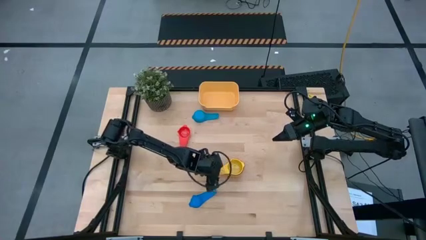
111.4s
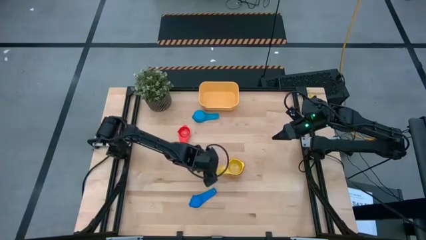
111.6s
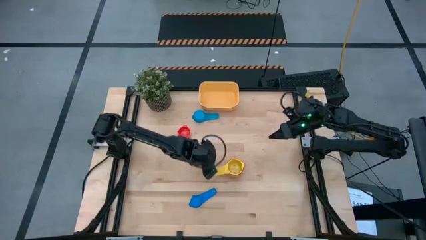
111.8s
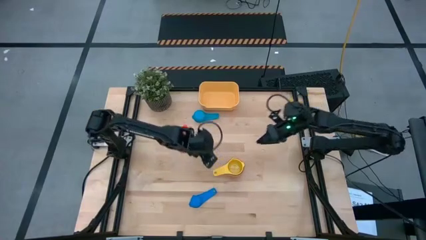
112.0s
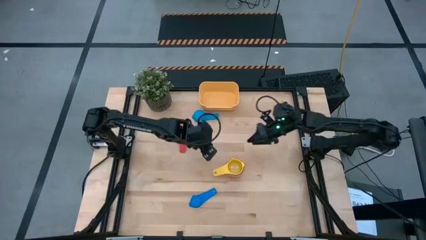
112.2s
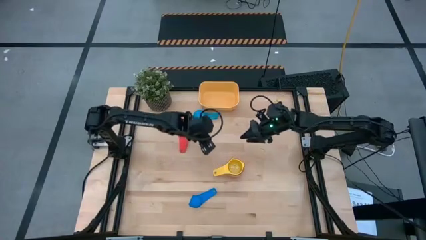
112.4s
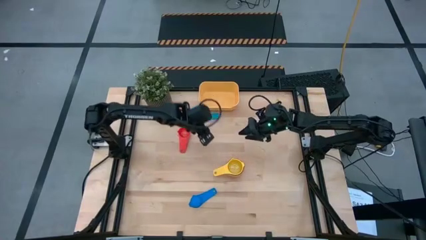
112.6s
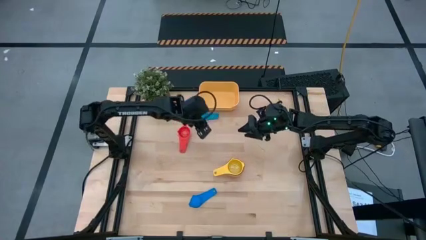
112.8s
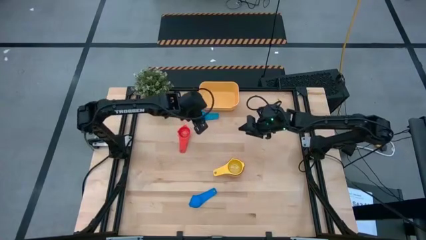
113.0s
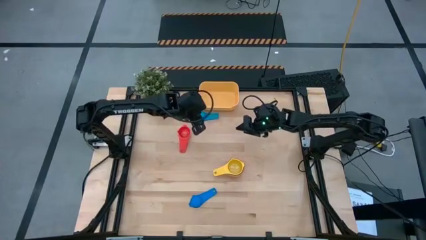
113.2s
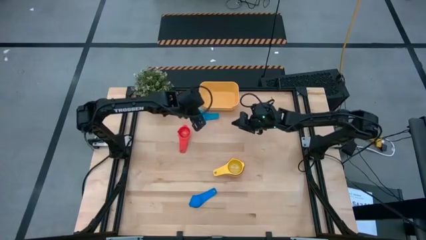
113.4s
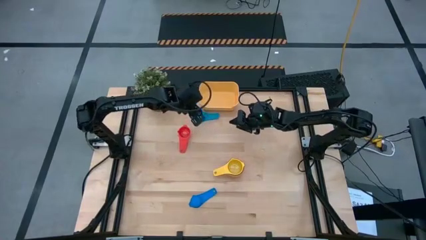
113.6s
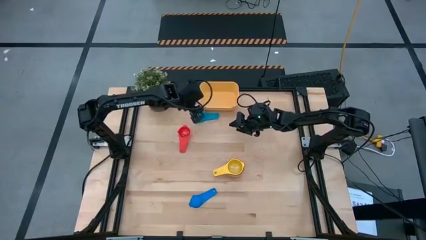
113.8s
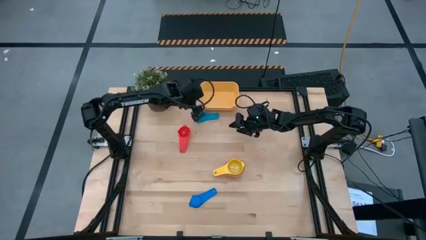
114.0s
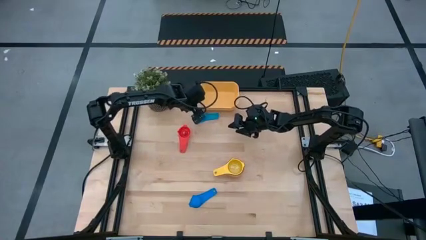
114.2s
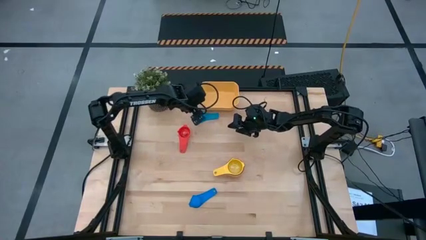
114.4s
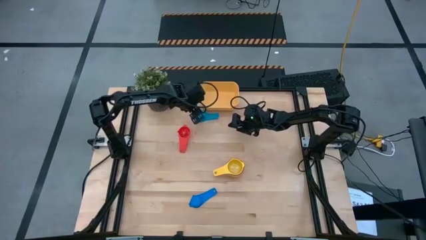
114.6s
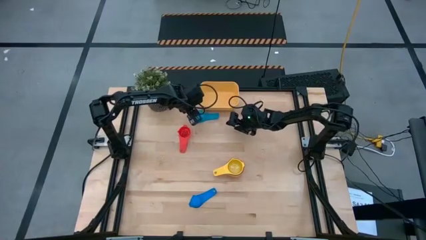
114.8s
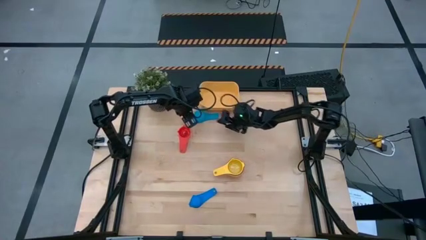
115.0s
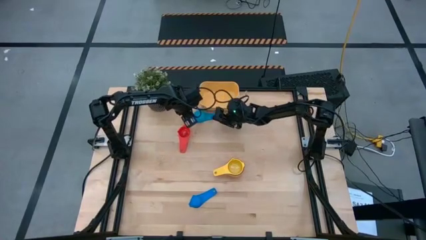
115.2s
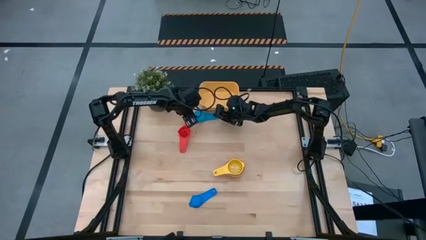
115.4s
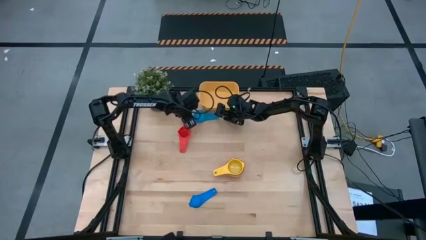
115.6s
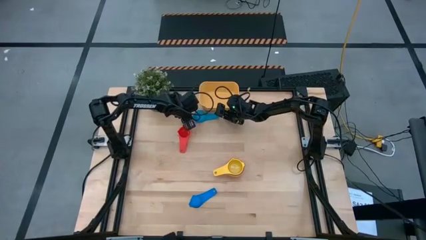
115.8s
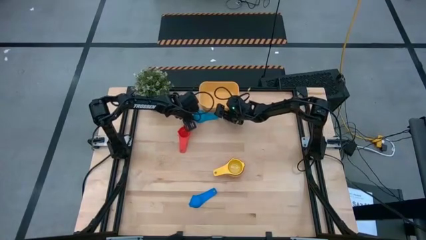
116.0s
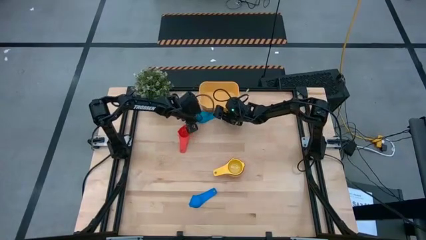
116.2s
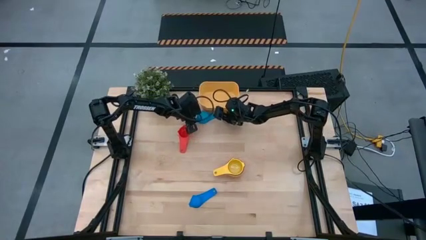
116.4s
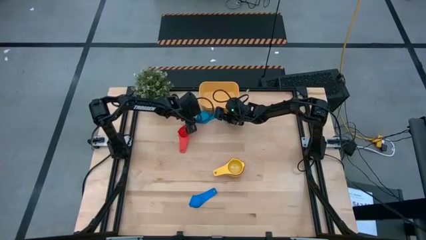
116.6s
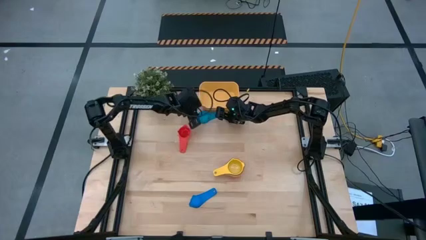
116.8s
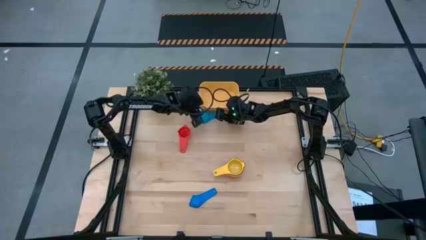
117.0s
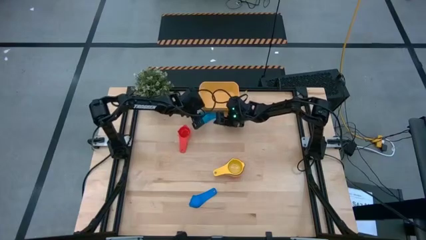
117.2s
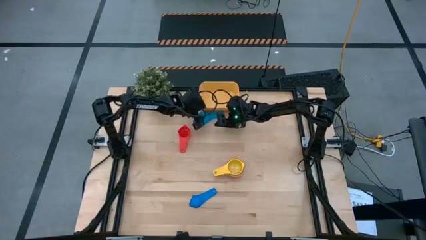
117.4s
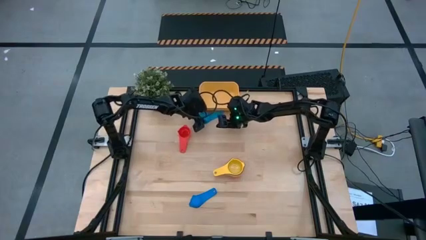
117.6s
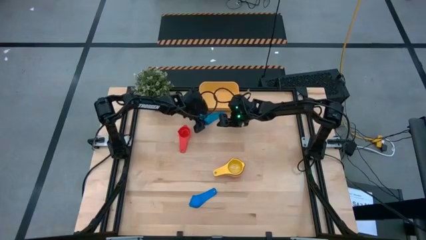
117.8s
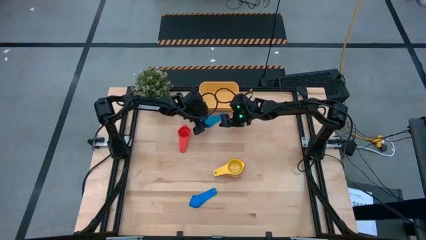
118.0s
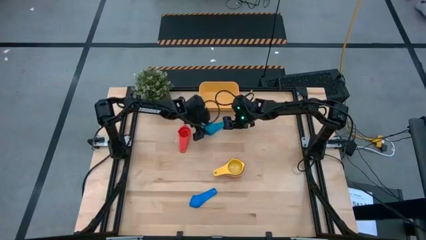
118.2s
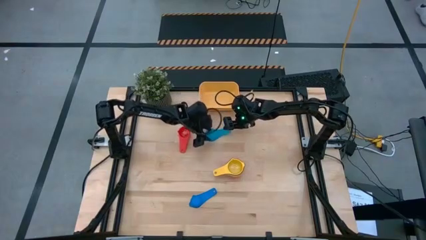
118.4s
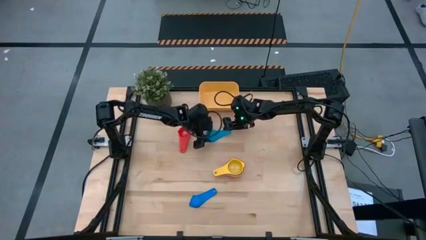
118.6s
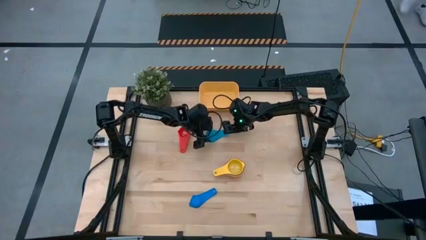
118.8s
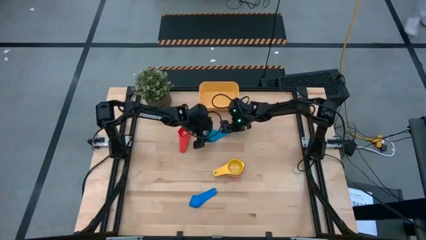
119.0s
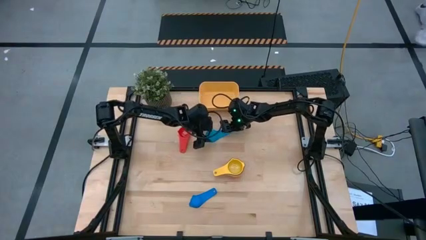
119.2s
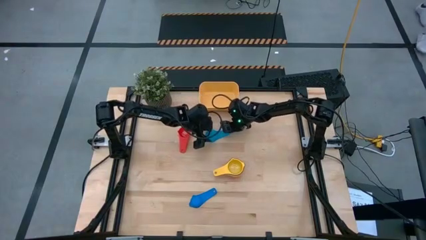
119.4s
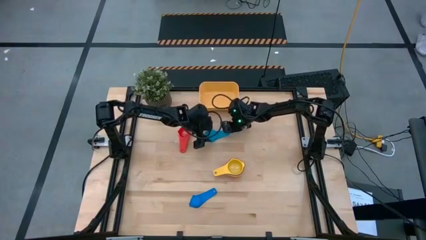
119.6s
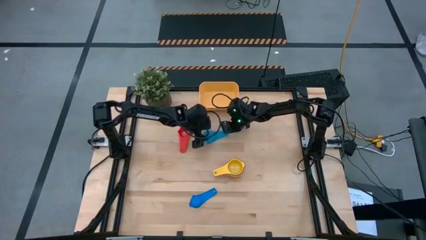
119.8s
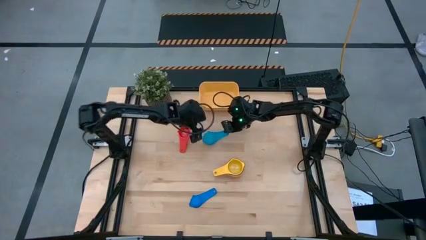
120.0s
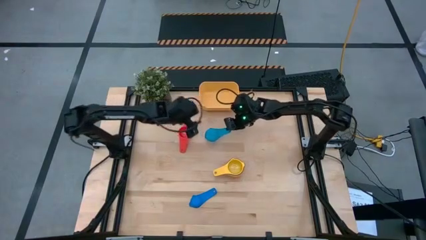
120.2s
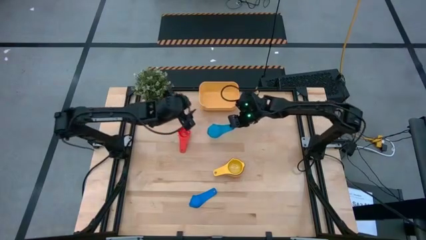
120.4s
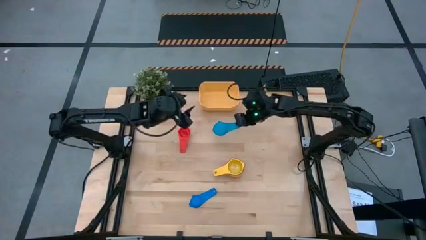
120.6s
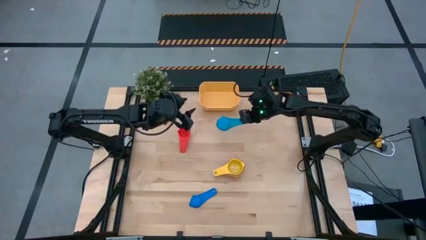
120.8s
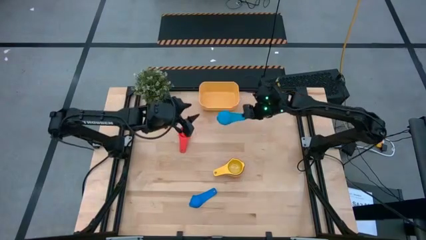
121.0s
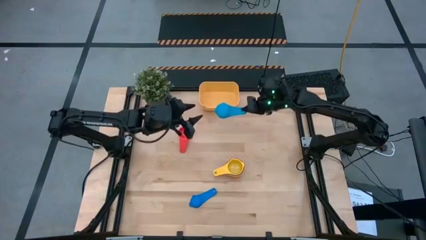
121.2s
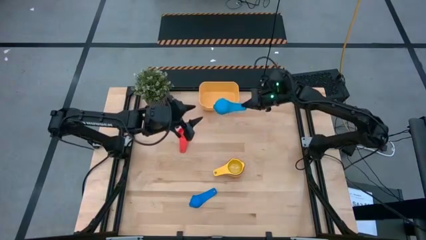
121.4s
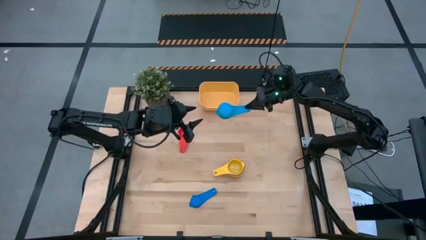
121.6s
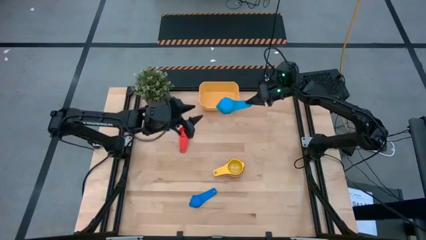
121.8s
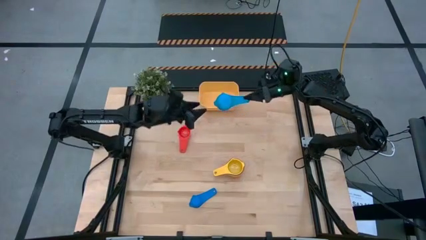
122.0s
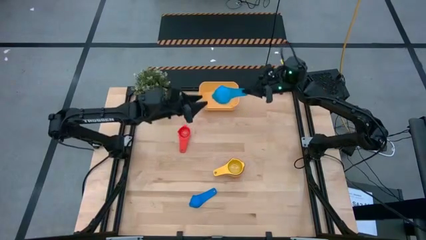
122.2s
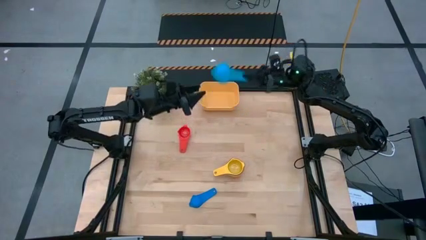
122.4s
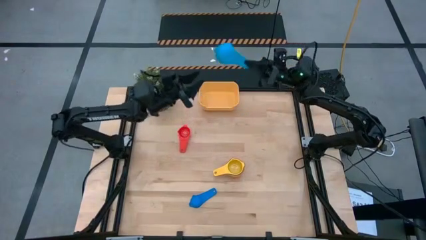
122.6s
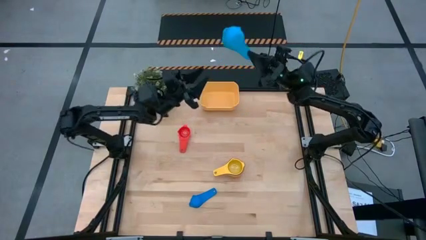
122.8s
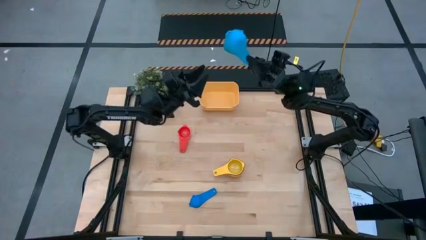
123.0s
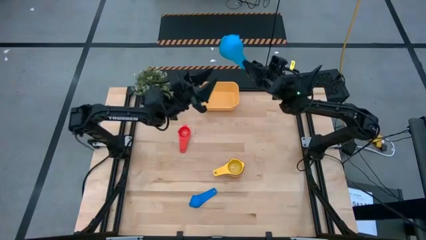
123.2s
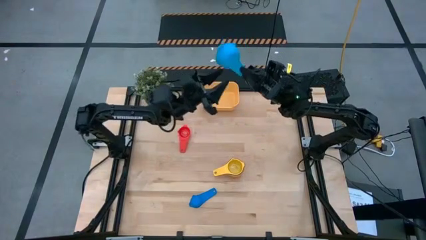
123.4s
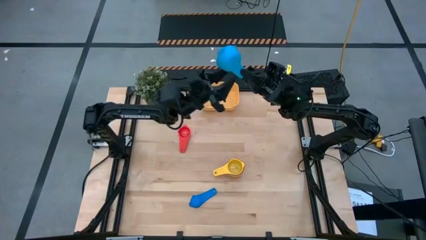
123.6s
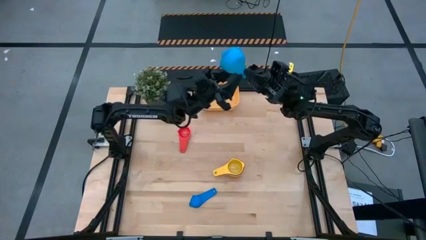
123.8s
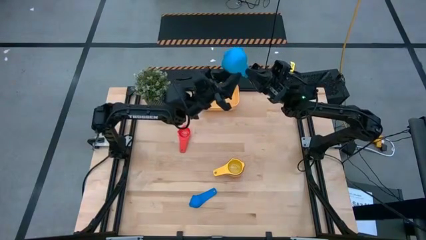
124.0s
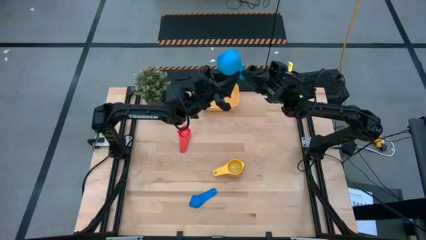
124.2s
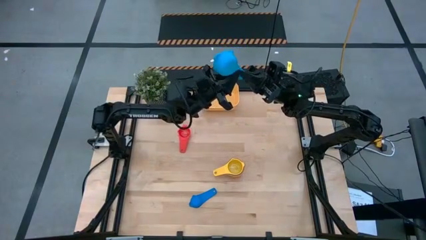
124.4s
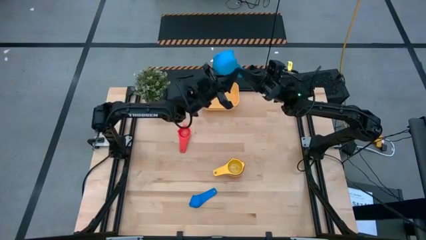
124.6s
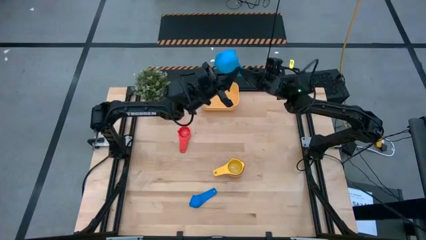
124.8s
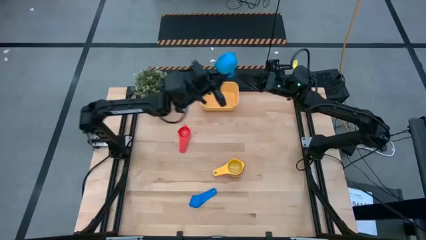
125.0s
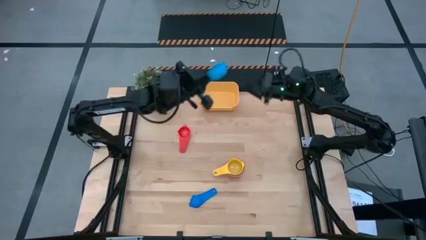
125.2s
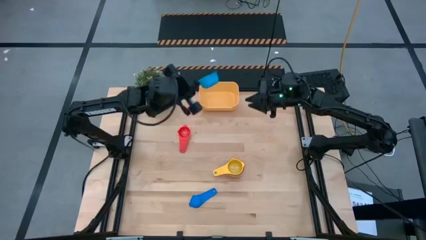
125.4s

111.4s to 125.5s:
Task: Nest measuring cups in basket
Stack the light blue measuring cup on top of the yellow measuring cup

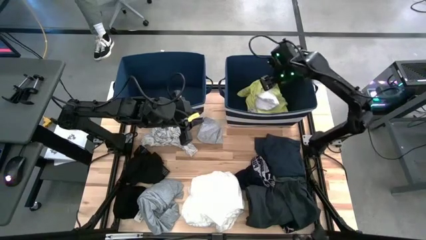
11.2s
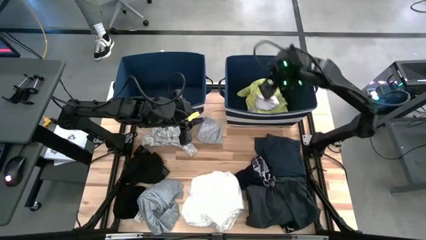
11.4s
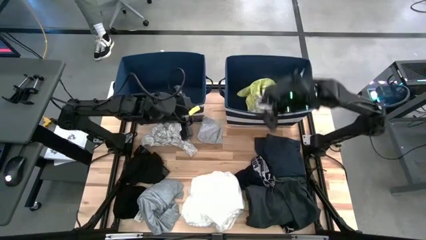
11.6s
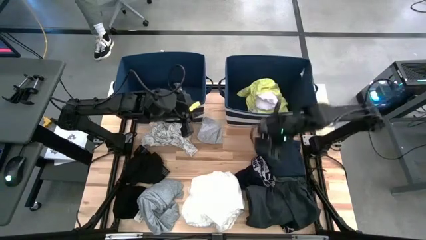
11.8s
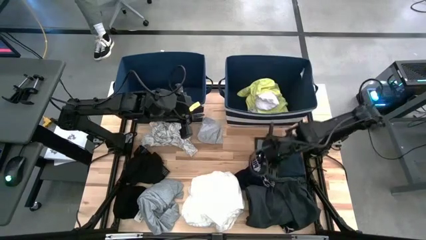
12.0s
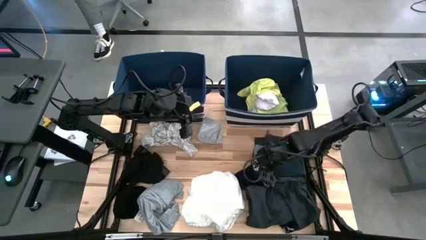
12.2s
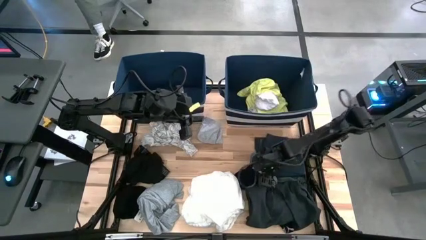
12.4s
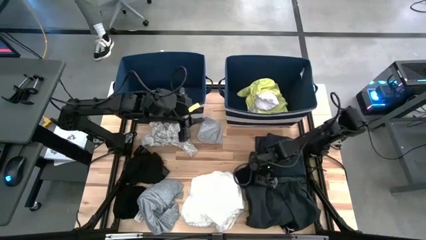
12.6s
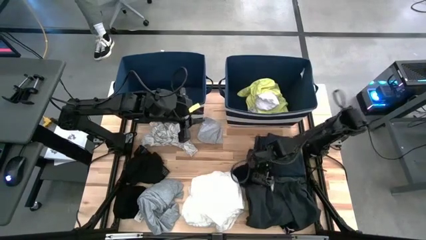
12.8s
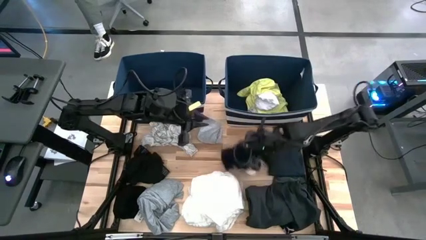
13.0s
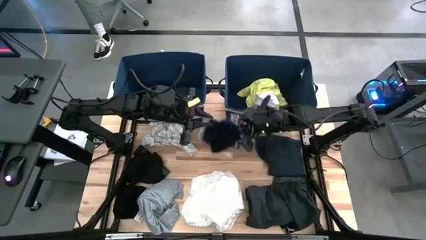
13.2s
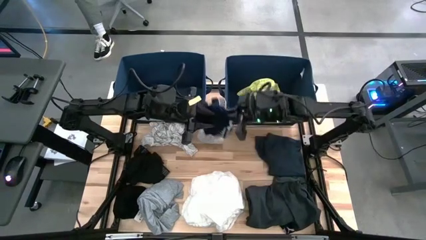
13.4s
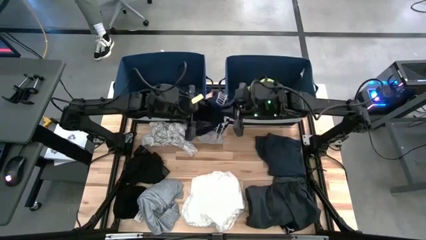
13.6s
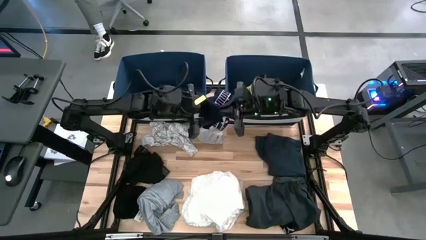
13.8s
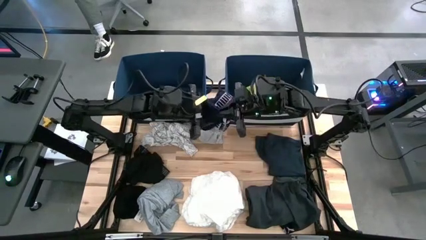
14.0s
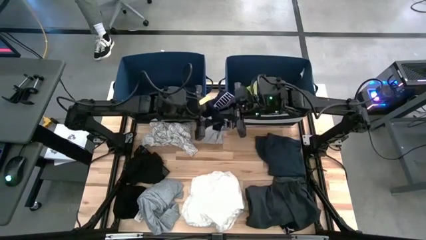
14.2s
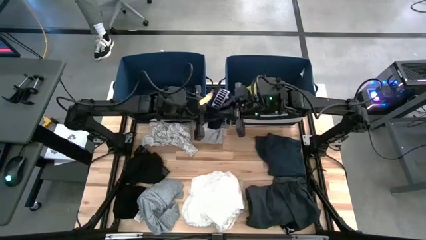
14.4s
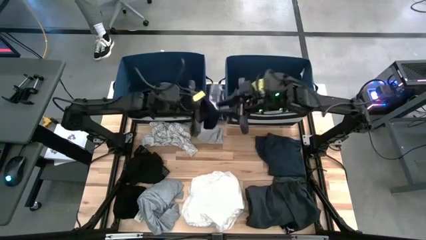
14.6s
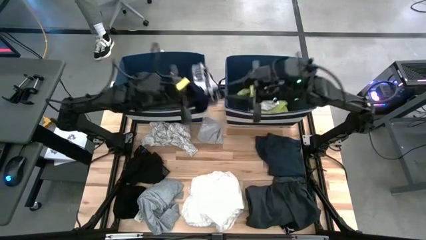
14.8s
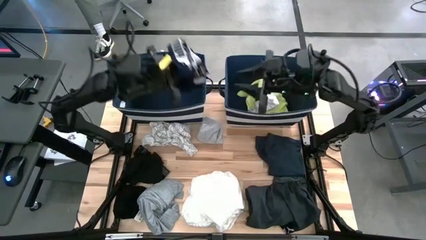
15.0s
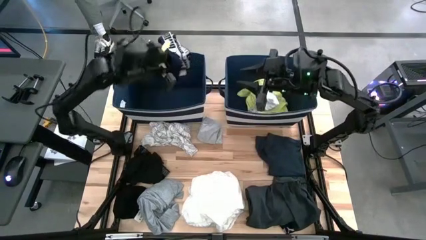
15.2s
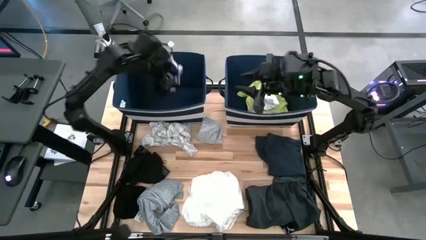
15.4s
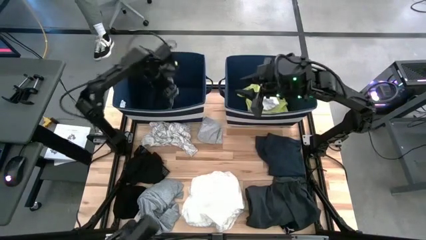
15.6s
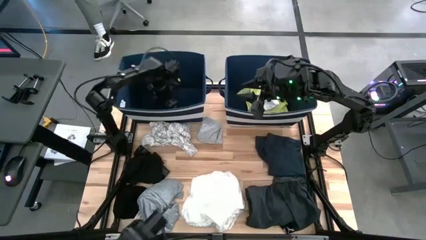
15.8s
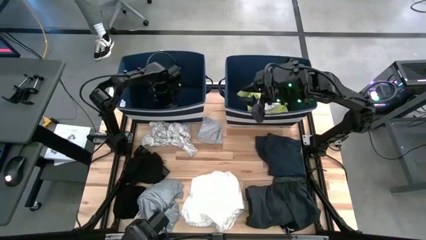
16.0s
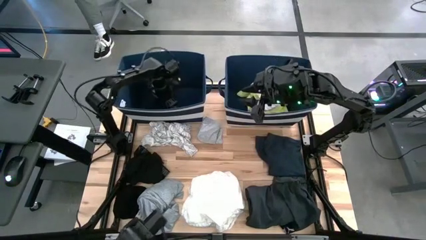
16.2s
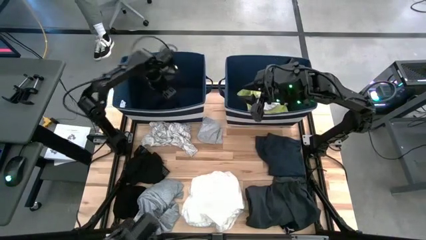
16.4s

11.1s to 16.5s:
Task: Sort clothes
Put the dark blue boxer into the left blue laundry bin
